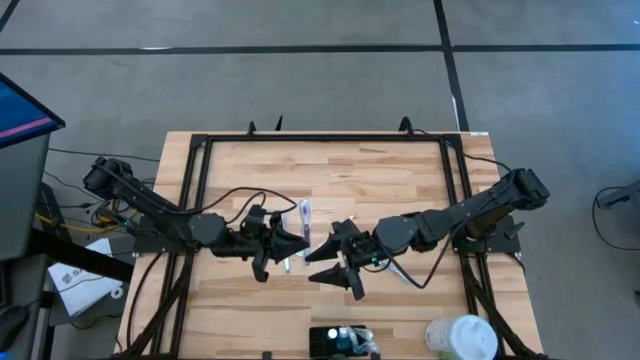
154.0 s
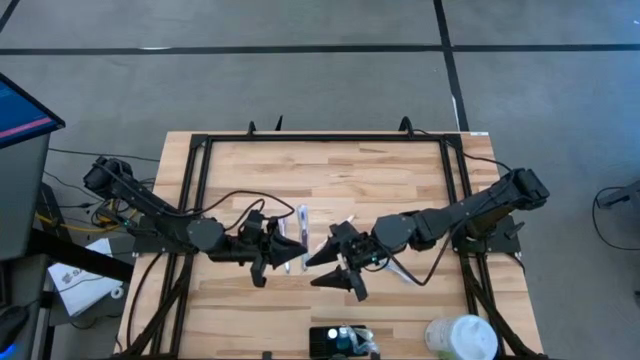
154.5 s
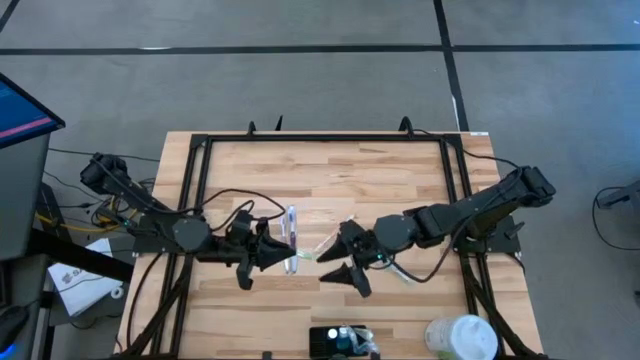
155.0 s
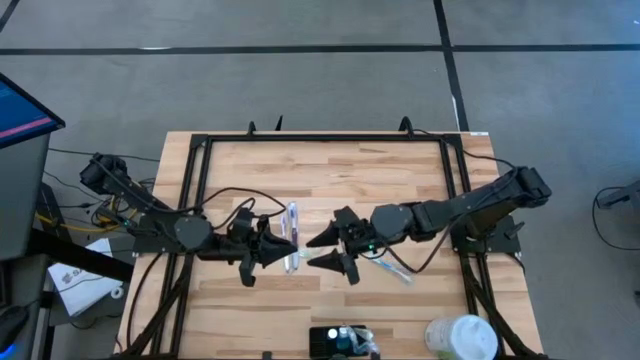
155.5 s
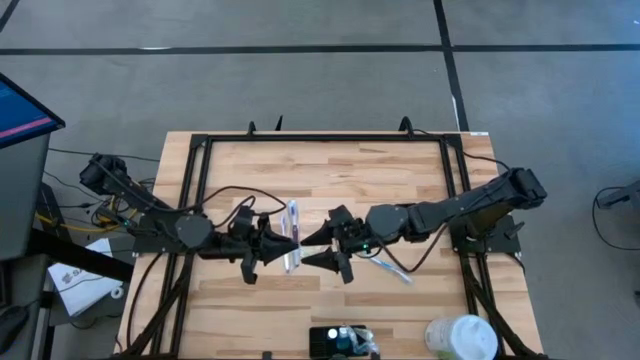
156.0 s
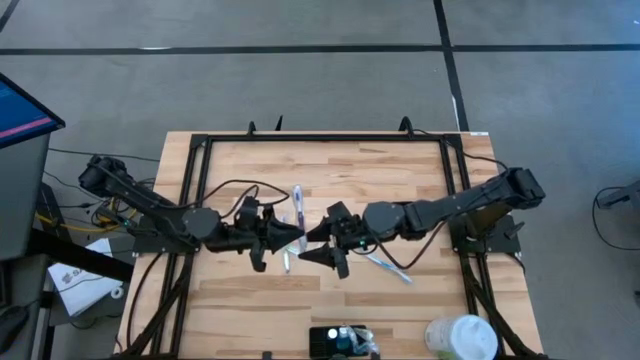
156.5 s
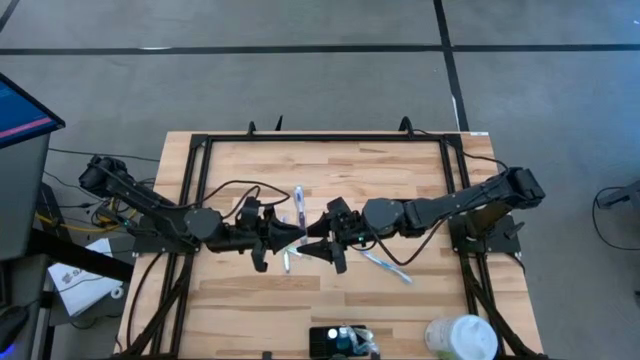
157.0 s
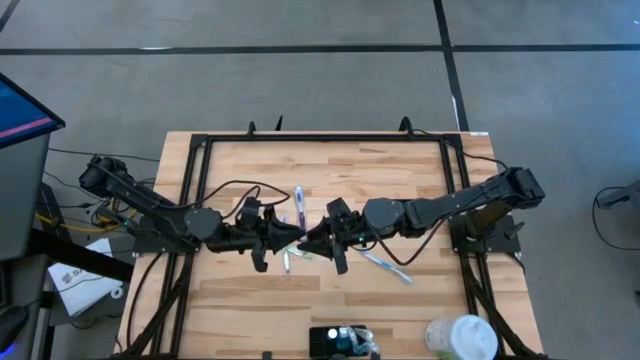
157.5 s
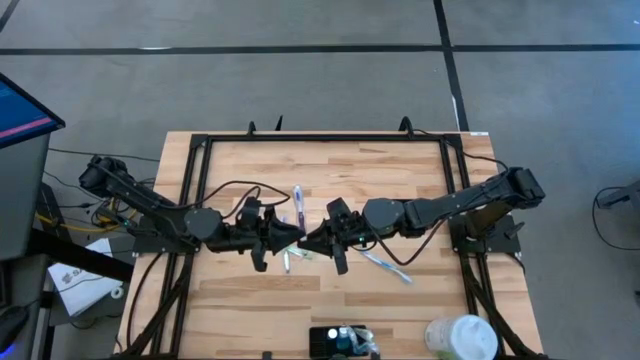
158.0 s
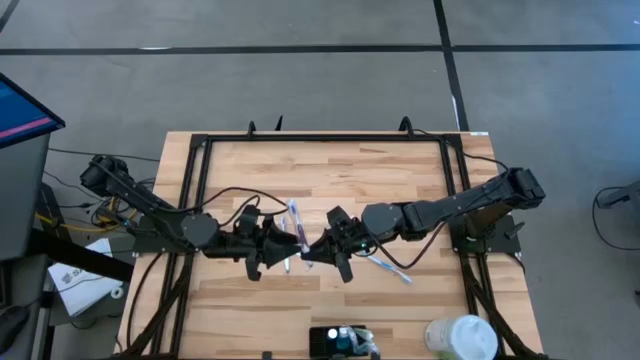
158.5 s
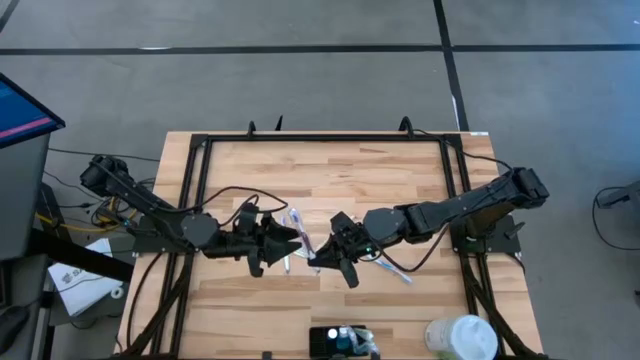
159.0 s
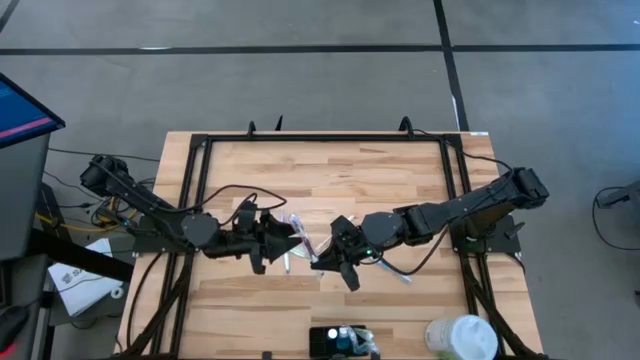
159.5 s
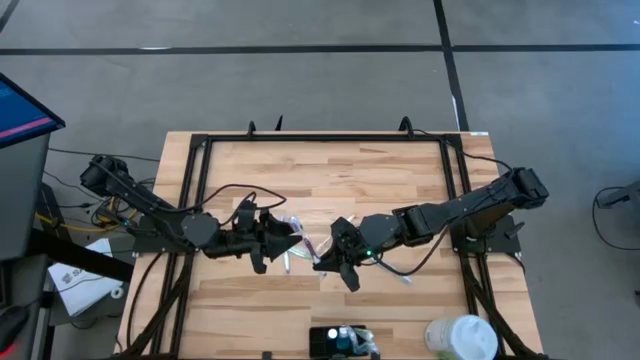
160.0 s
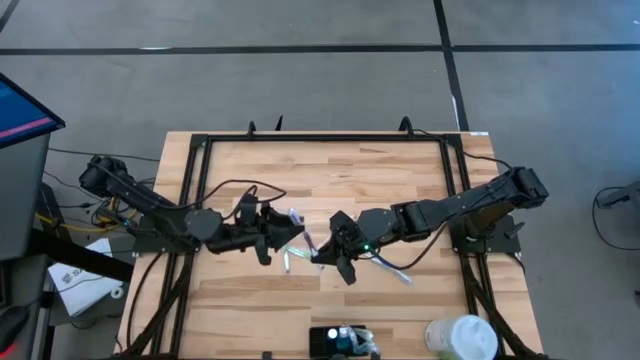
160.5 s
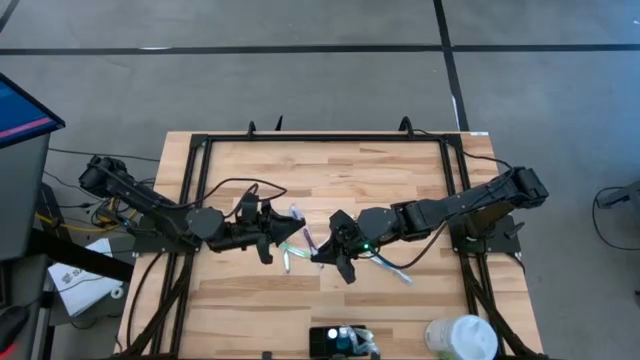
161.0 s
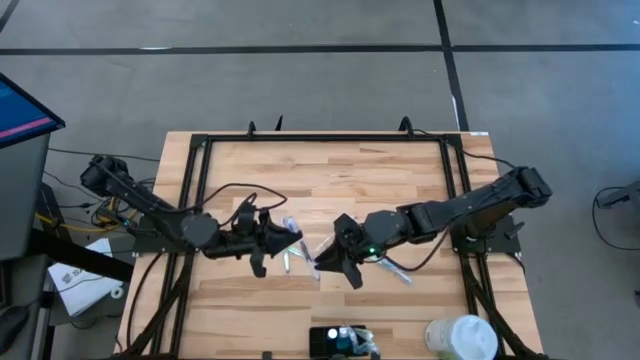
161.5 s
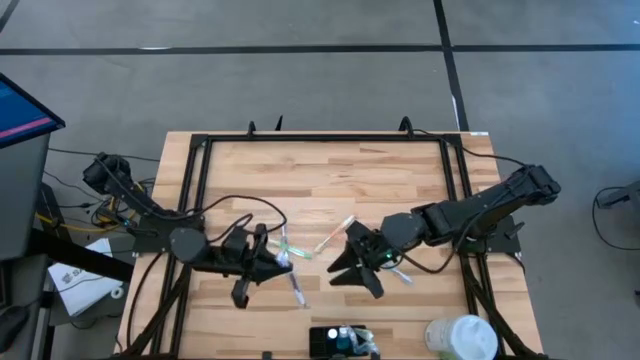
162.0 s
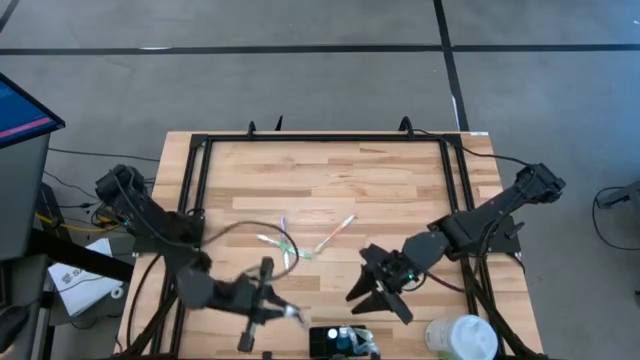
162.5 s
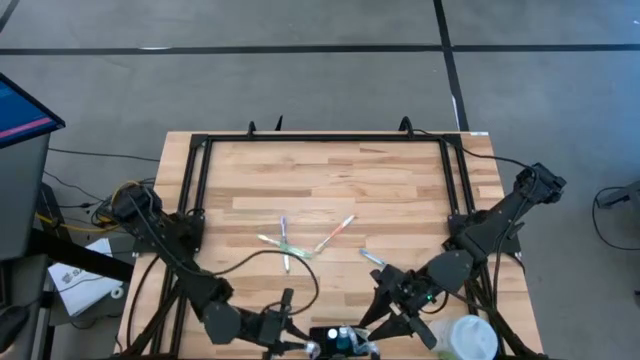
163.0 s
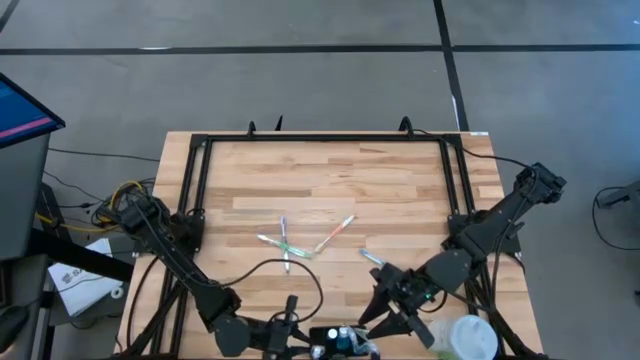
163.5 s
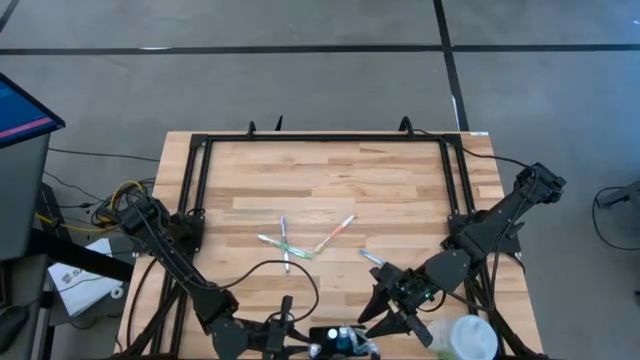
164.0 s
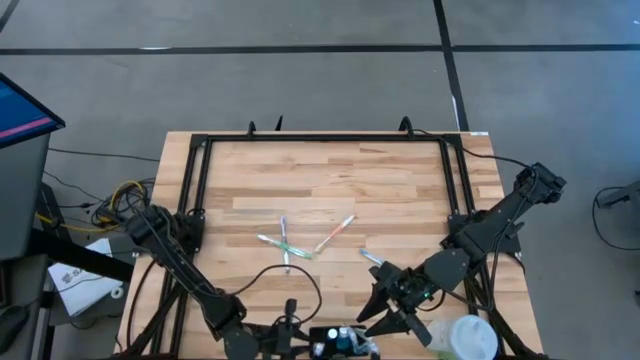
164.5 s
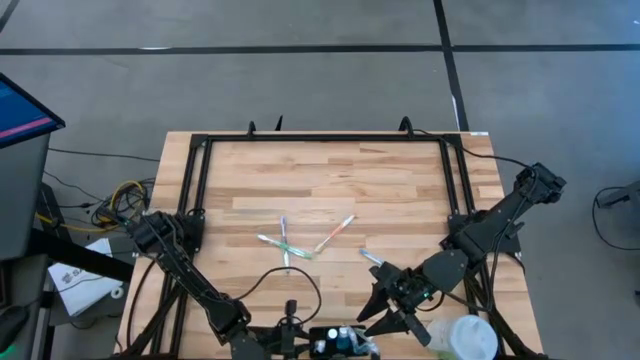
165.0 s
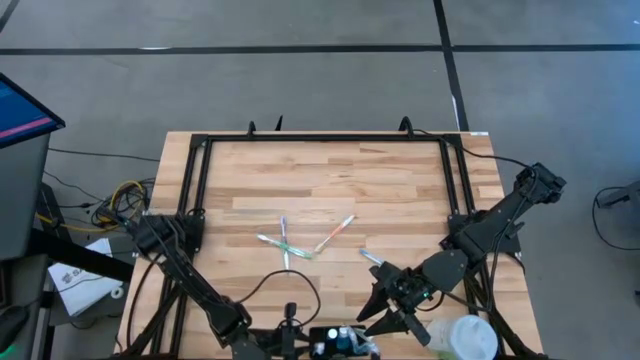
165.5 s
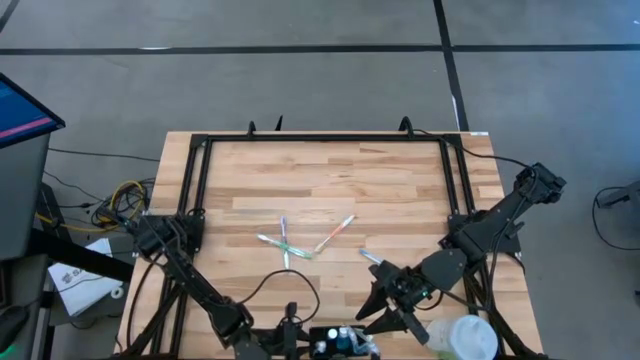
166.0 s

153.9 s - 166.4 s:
Task: Pick & Place toothbrushing station
Put the bottom purple toothbrush into the black mesh organizer

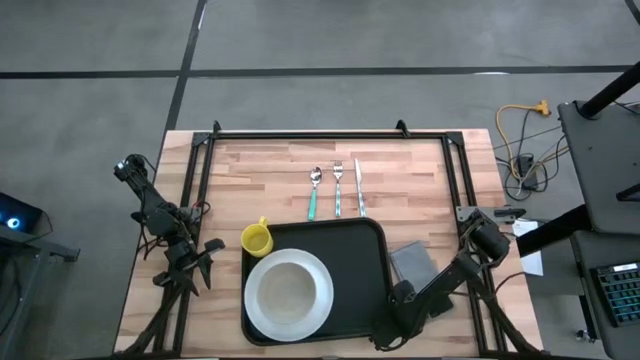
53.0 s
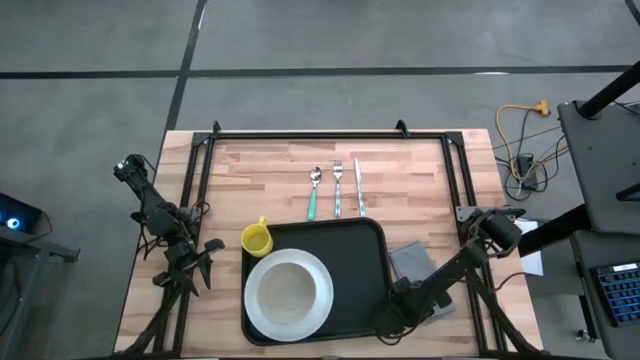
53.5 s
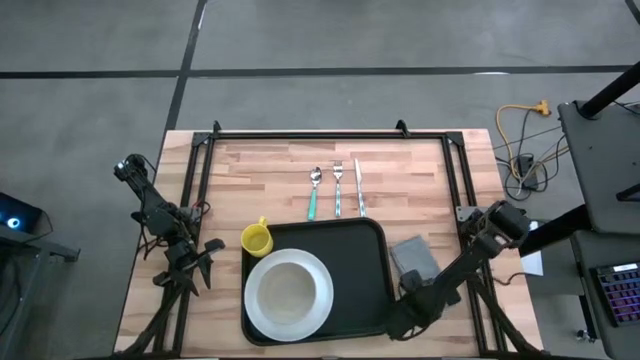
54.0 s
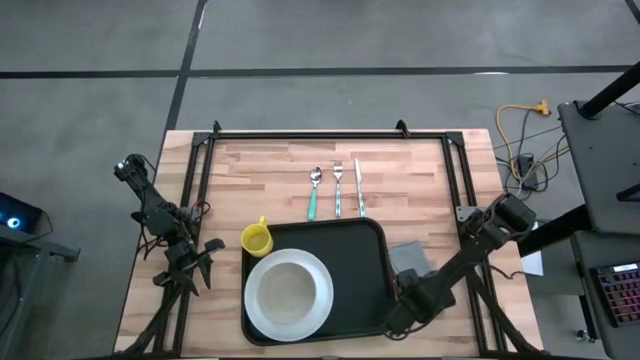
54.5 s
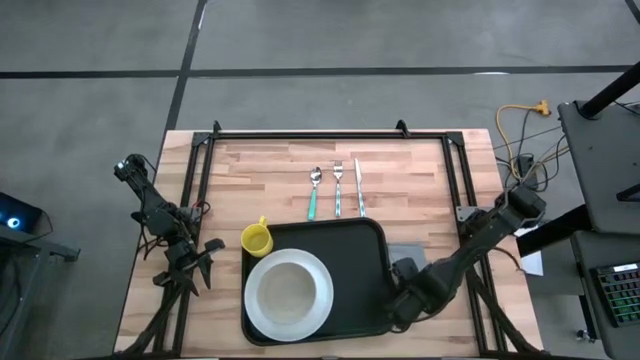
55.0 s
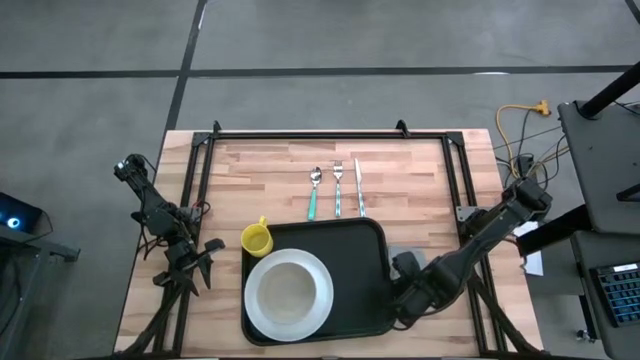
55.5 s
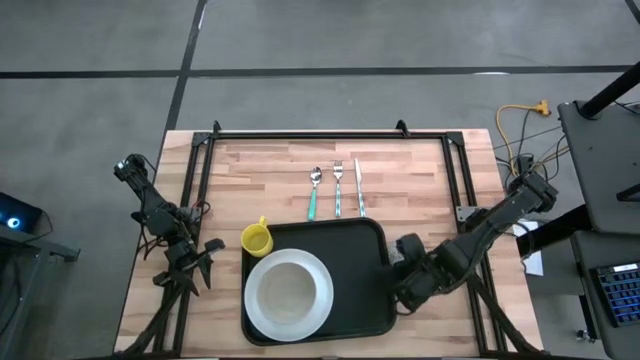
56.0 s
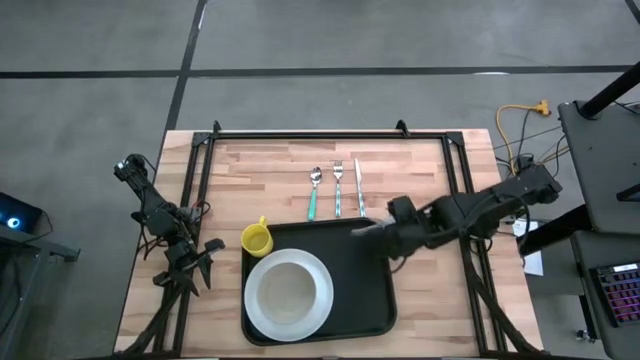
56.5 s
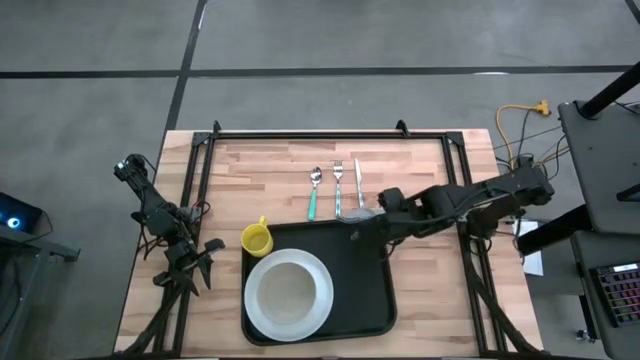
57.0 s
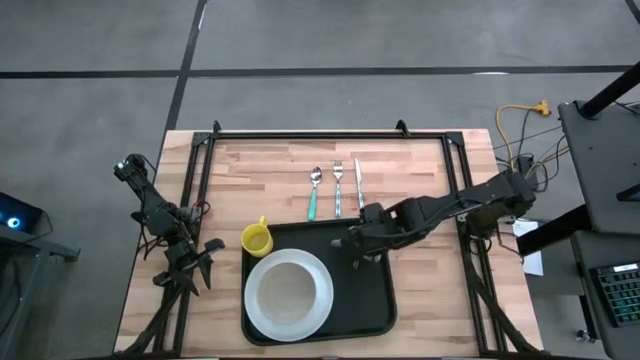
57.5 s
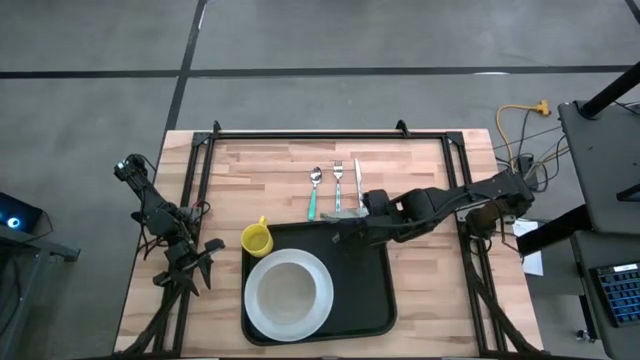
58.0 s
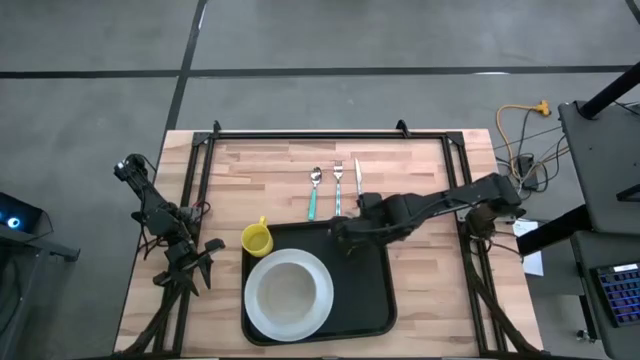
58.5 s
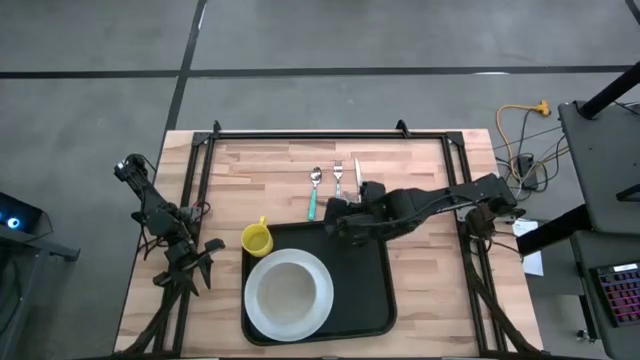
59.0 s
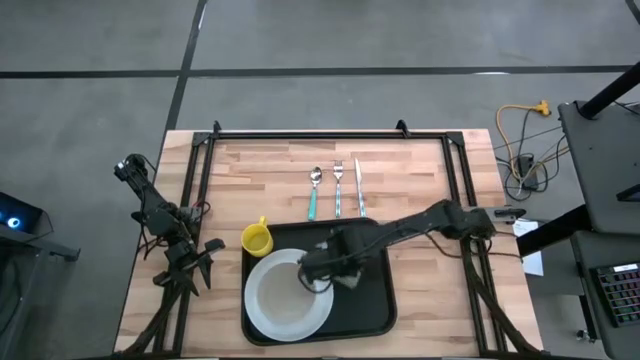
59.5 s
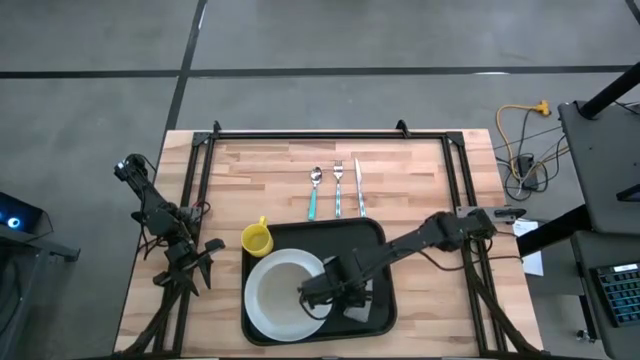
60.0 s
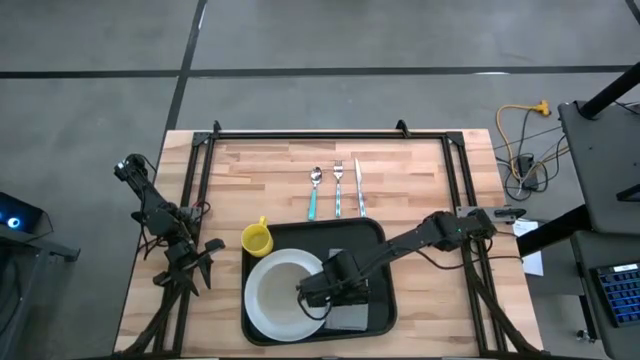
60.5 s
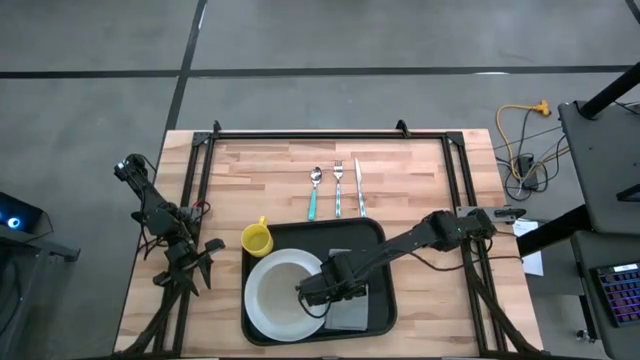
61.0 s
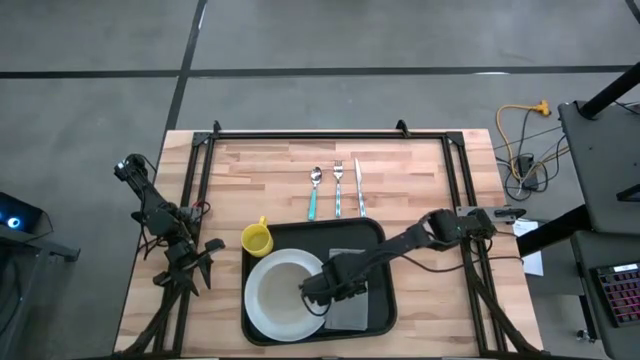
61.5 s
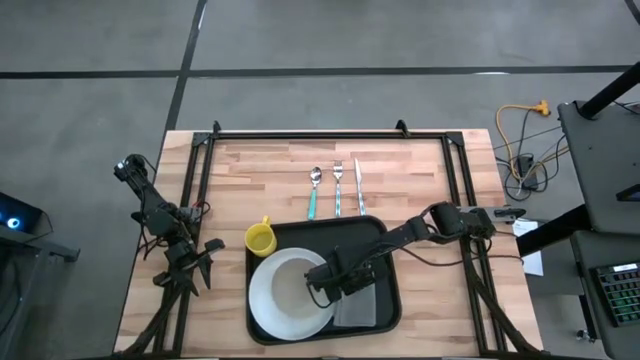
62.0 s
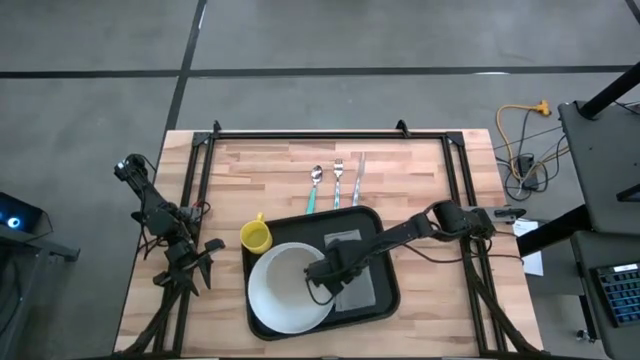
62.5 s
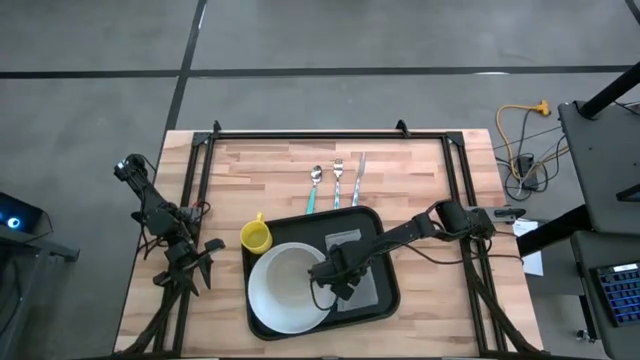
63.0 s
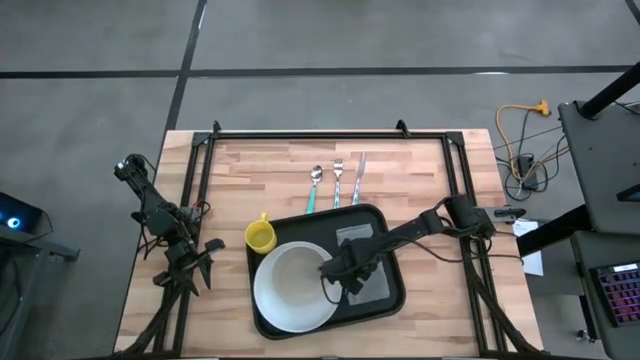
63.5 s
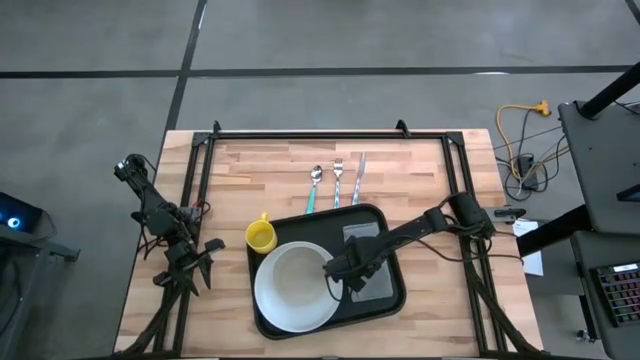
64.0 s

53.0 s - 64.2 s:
Task: Set up tray
Put the gray napkin on the black serving tray to the right of the white plate
